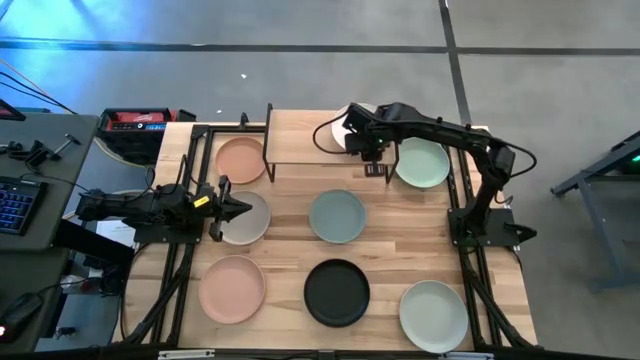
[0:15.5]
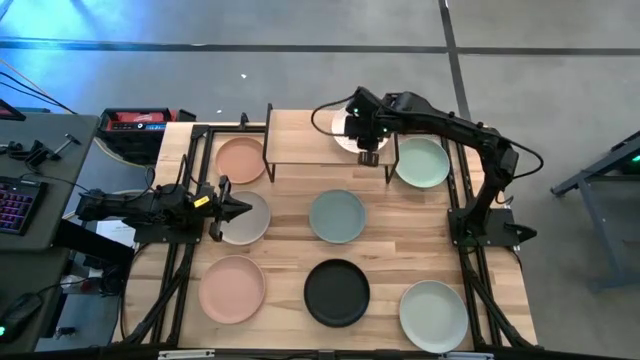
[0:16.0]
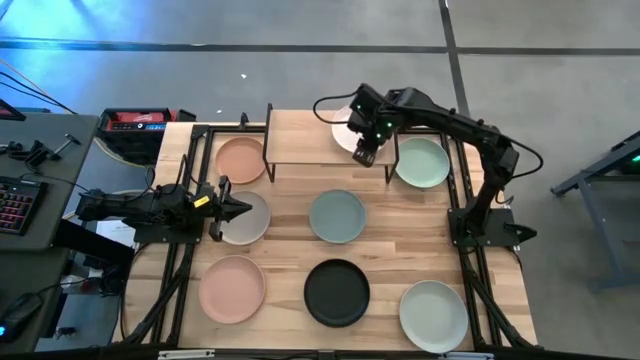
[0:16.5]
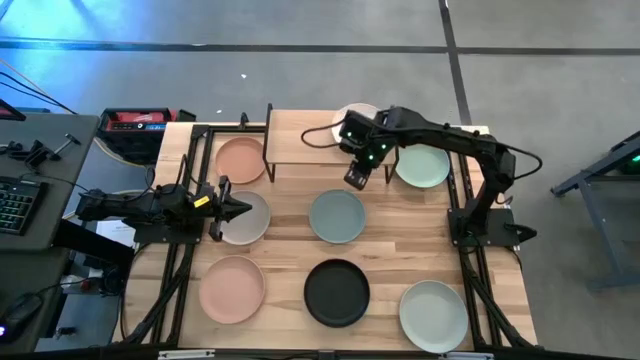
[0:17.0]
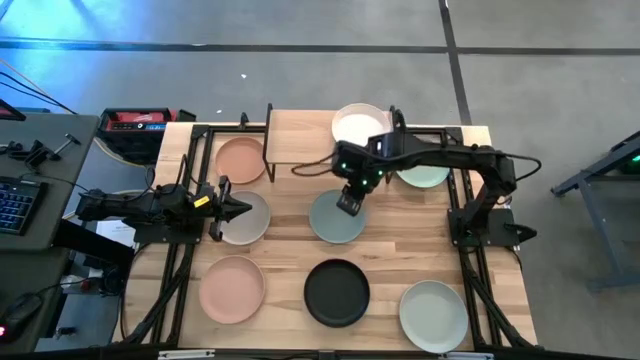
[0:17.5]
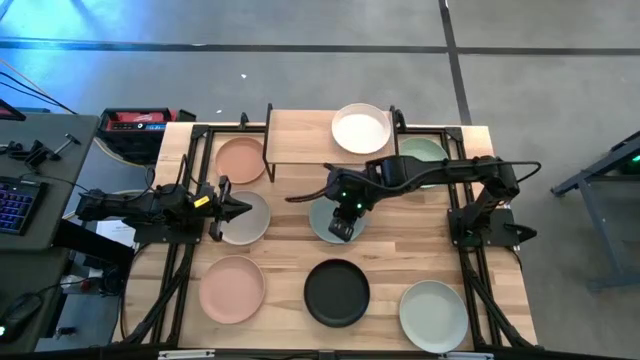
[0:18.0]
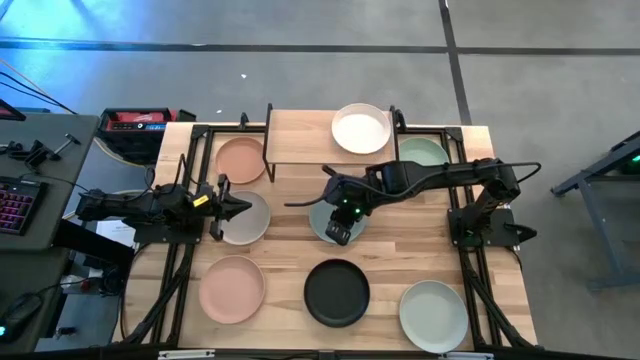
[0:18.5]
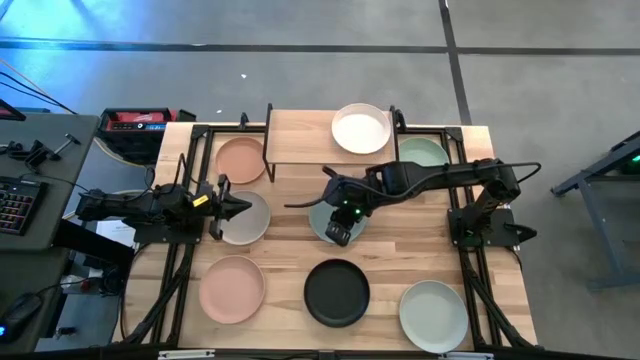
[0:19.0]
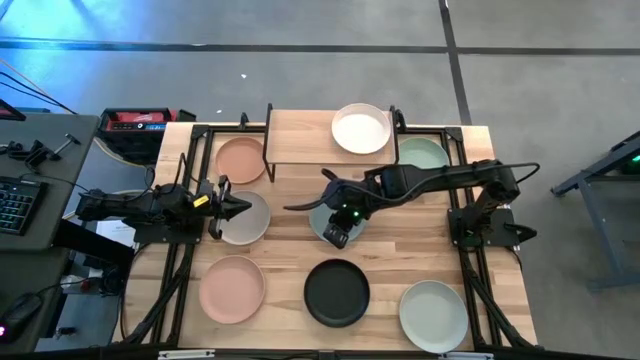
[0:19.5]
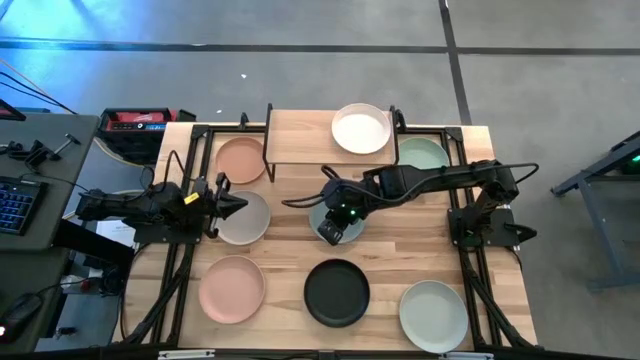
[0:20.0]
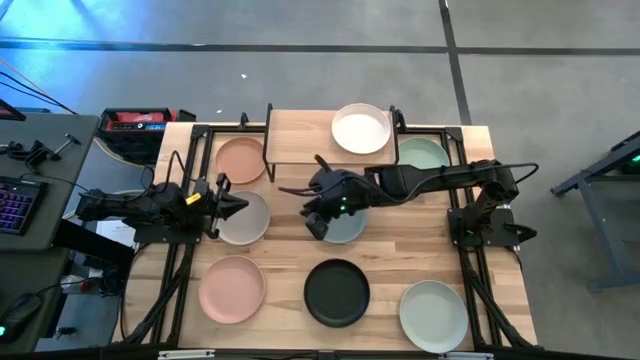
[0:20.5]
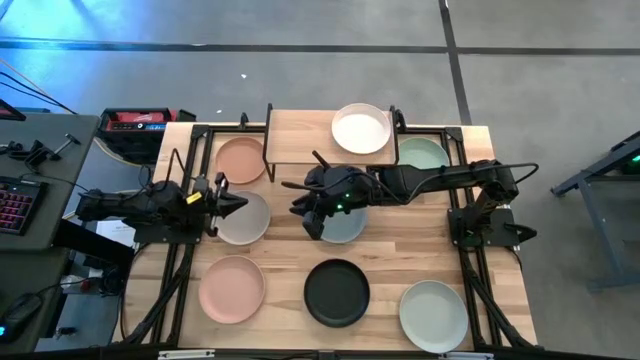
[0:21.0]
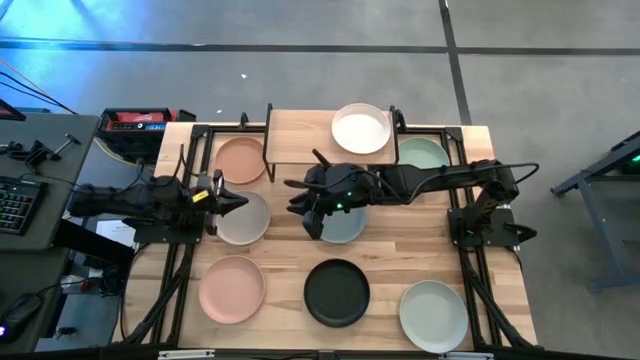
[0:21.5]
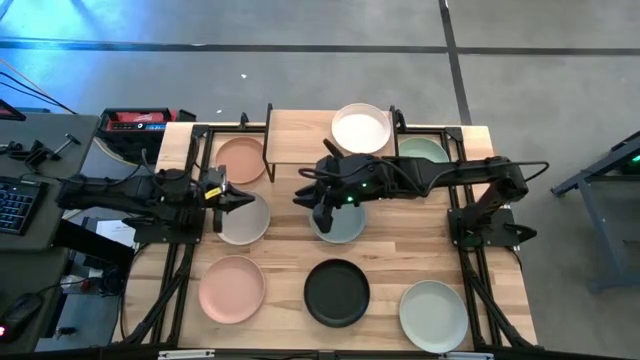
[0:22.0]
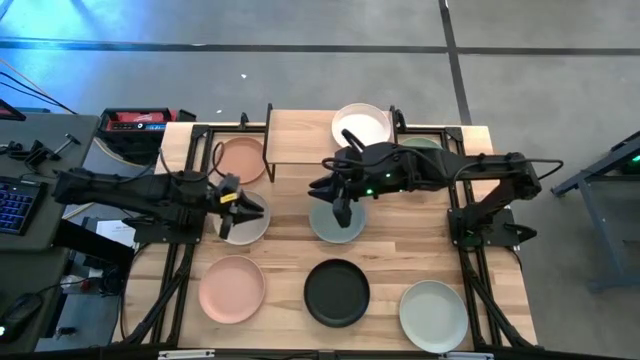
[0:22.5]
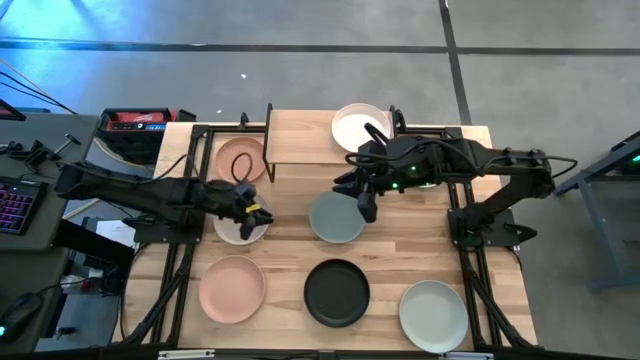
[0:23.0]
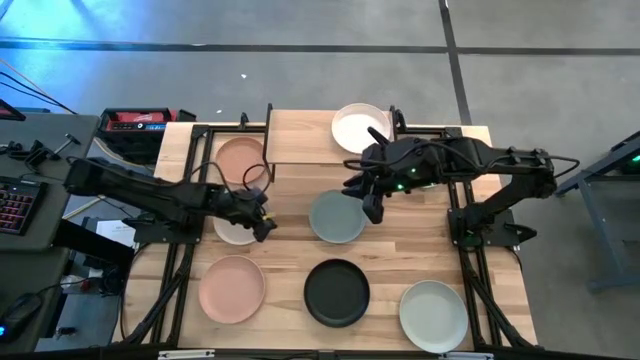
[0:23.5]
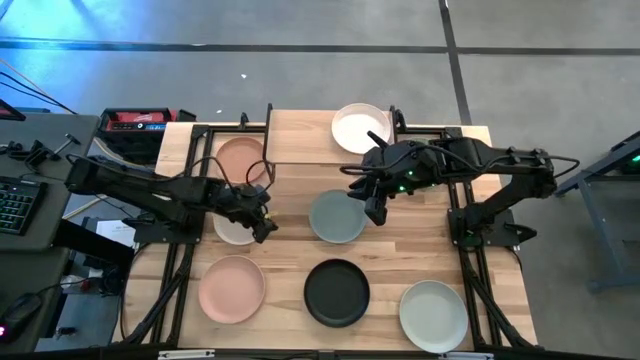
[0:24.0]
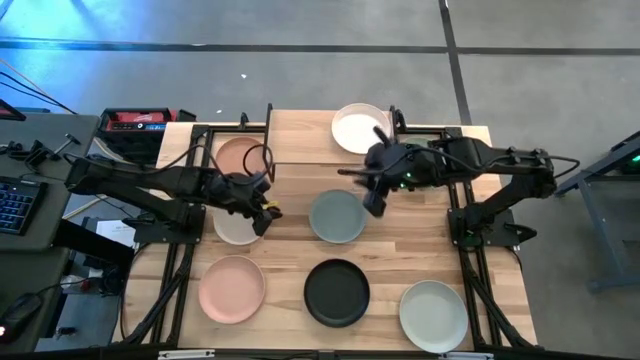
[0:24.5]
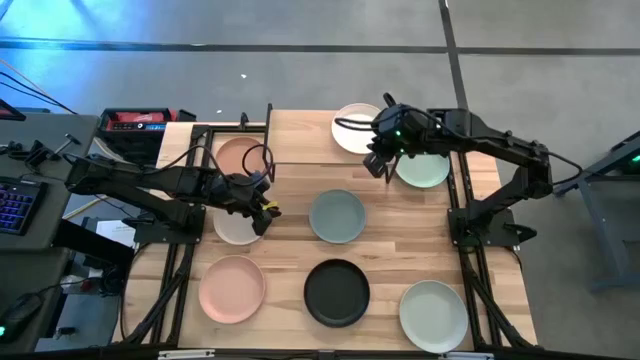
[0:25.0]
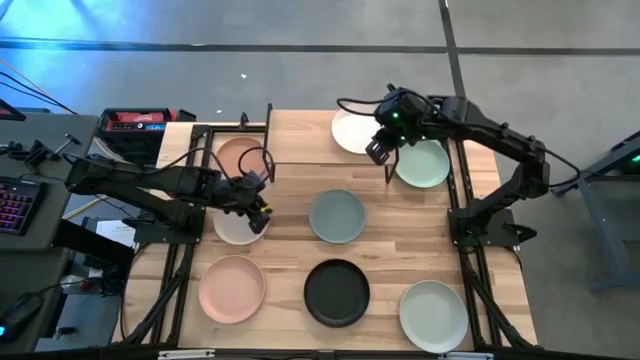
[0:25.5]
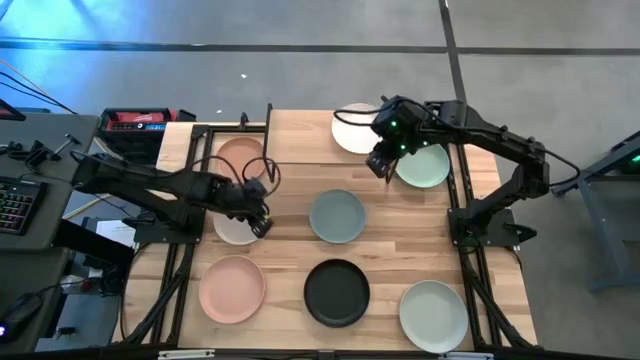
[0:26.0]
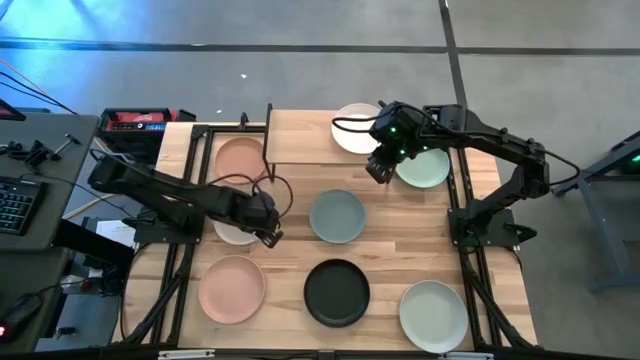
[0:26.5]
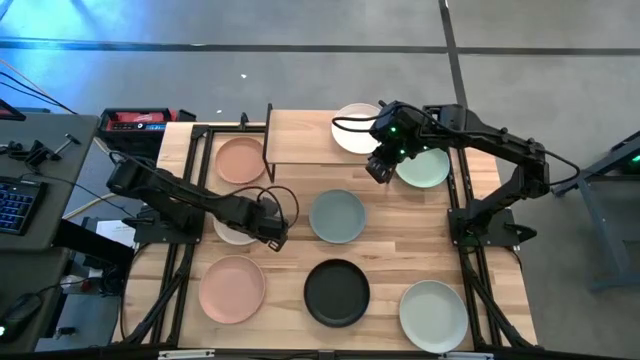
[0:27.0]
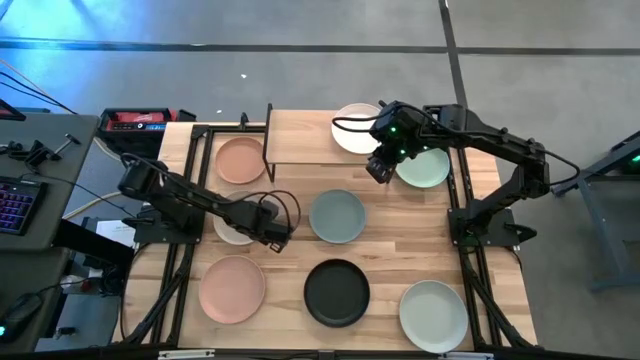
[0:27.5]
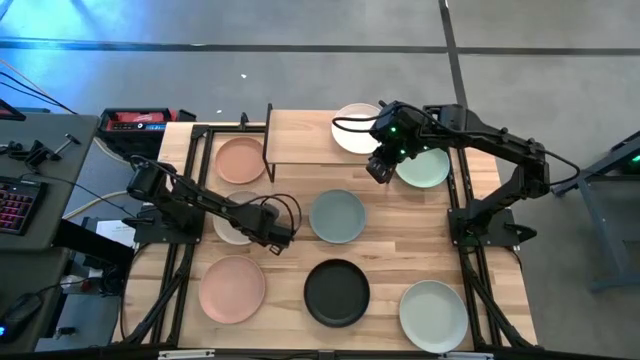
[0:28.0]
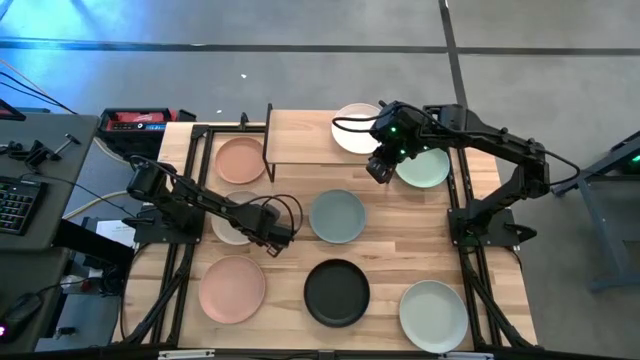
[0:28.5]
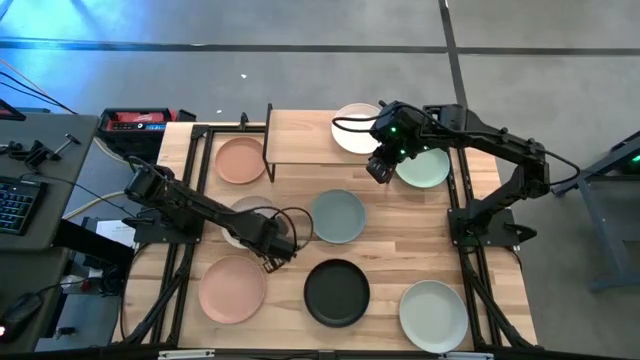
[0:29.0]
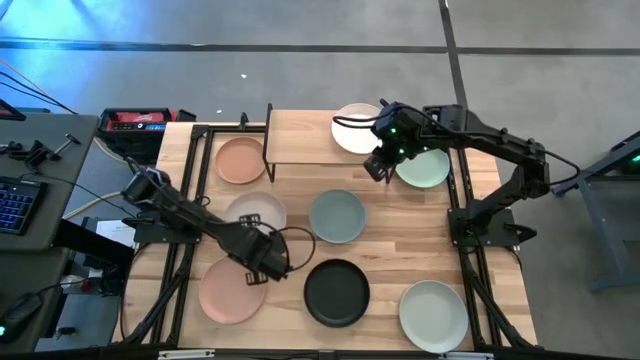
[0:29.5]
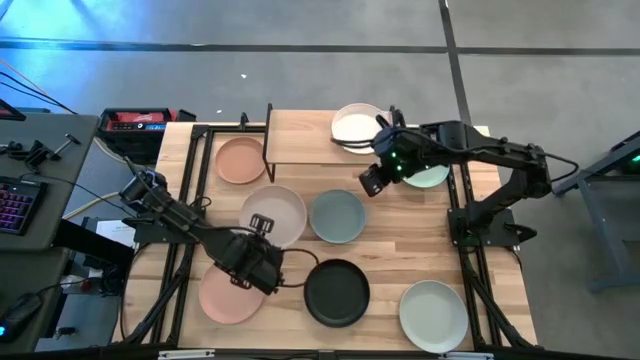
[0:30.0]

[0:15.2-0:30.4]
Task: Place and stack plates onto a shelf
Stack the light brown plate on top of the other white plate on the shelf

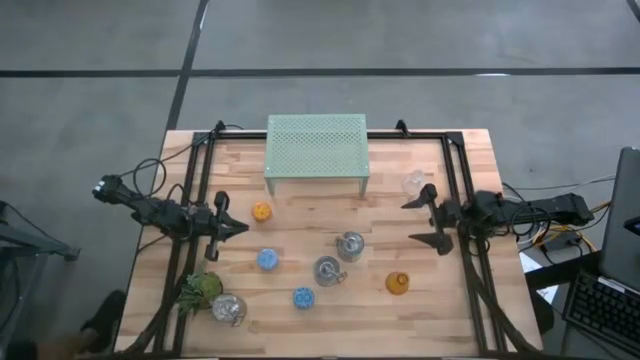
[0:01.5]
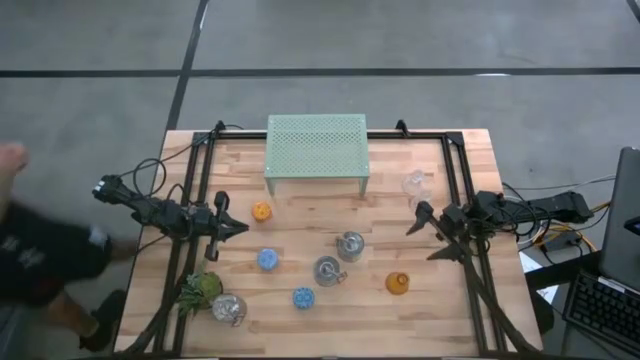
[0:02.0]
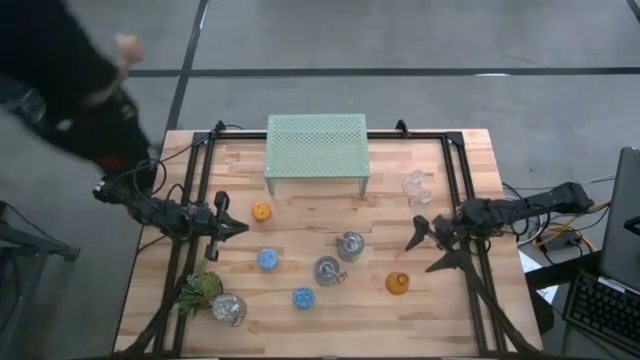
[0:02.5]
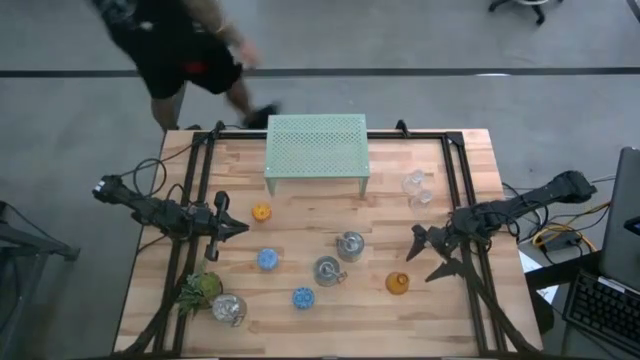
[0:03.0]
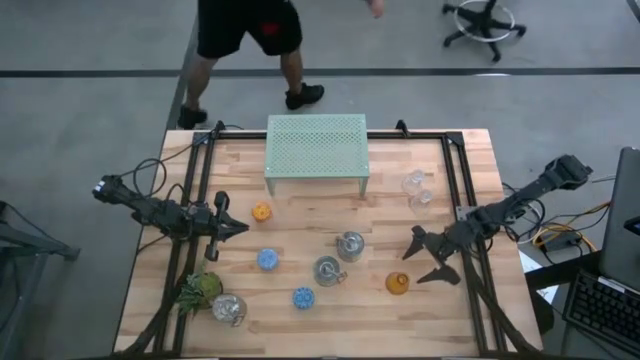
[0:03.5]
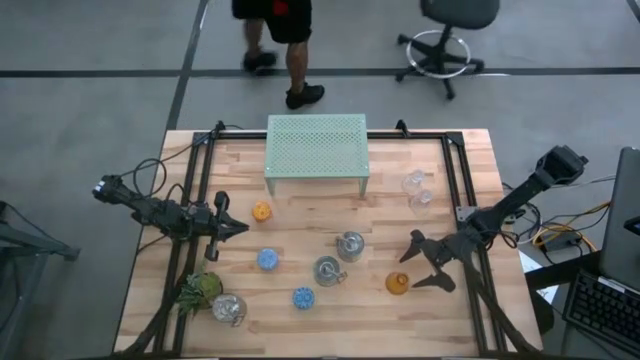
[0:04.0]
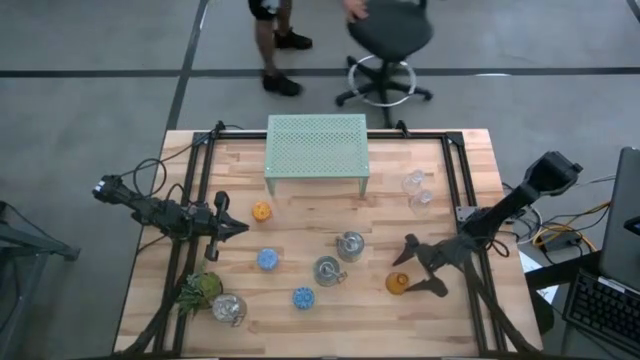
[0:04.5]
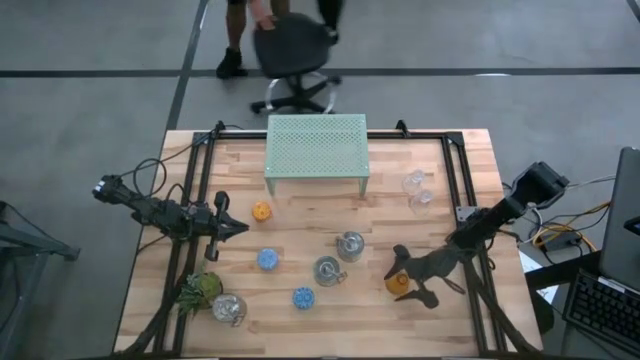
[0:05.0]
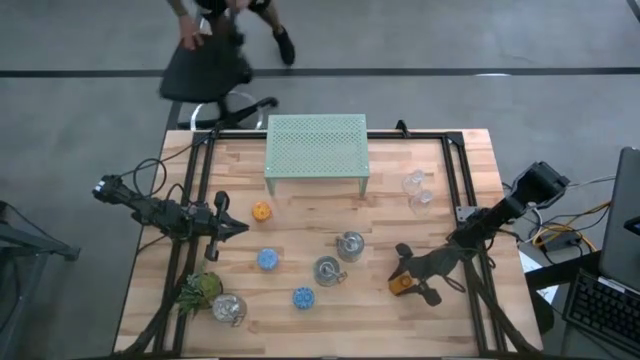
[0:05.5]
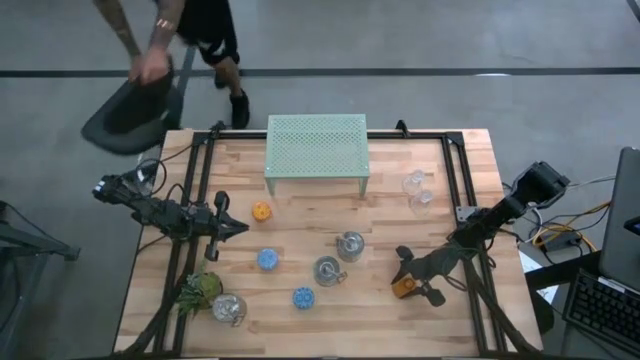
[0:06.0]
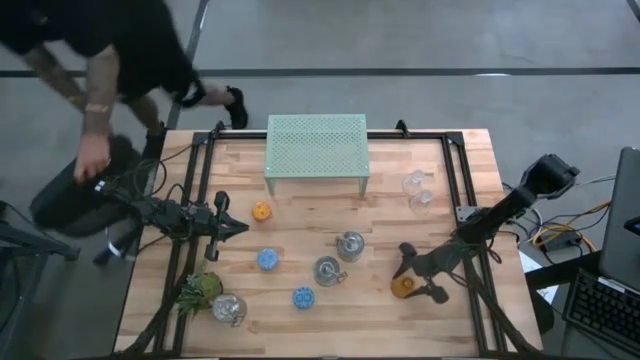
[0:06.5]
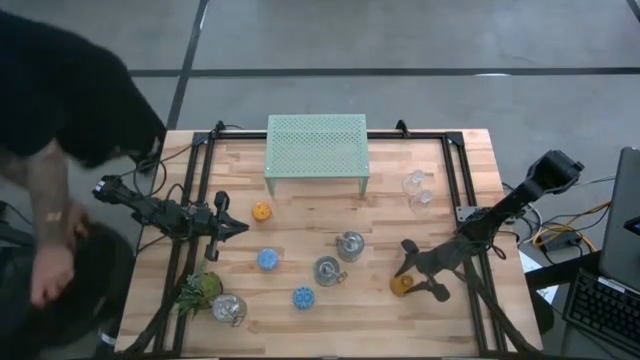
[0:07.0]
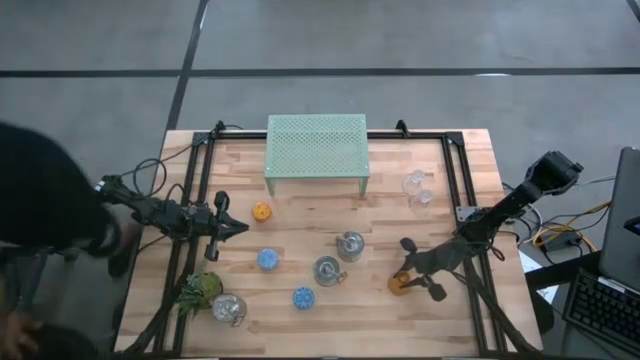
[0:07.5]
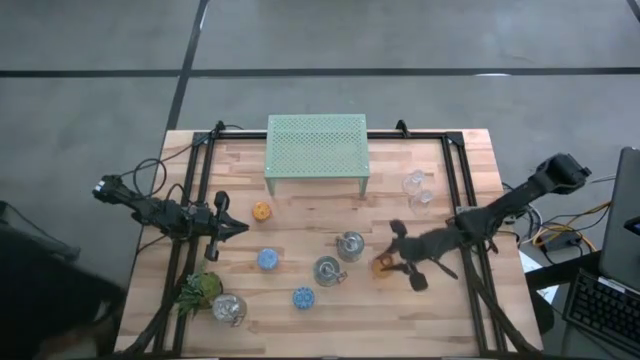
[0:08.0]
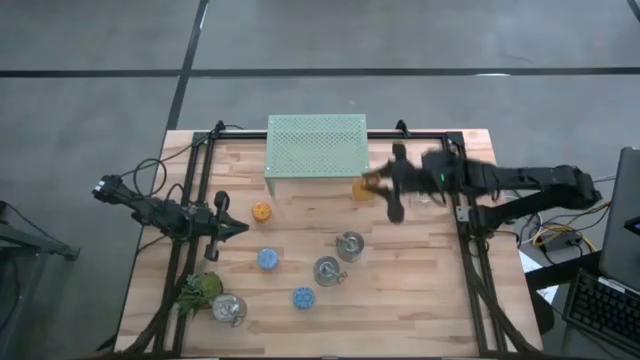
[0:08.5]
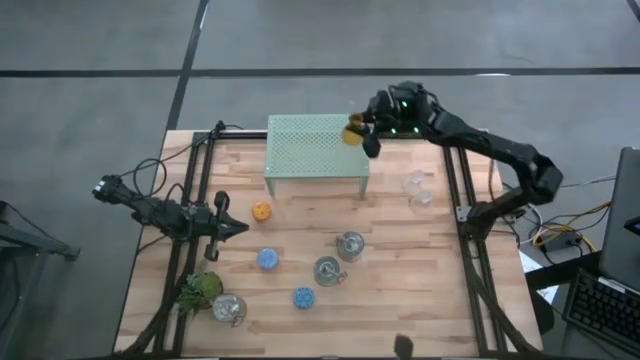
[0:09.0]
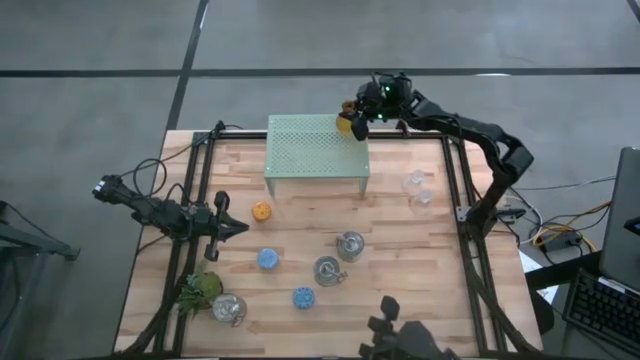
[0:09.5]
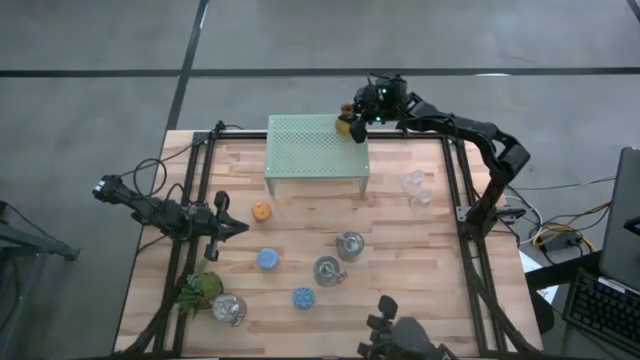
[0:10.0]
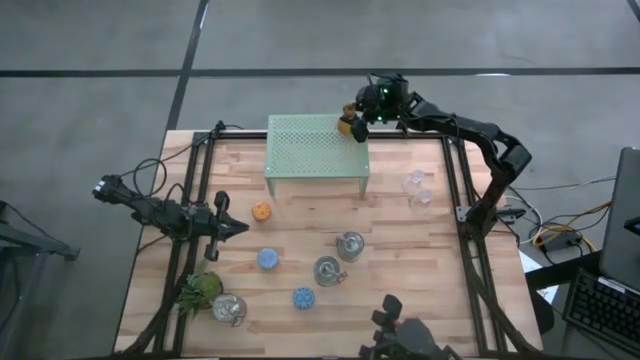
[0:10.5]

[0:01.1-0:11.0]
Task: Pick & Place candle stick holders
Put the yellow glass candle holder on the shelf
